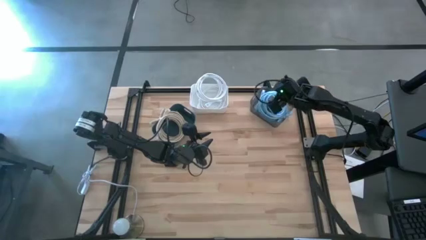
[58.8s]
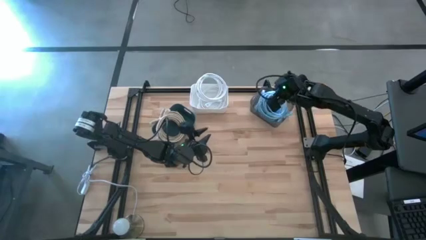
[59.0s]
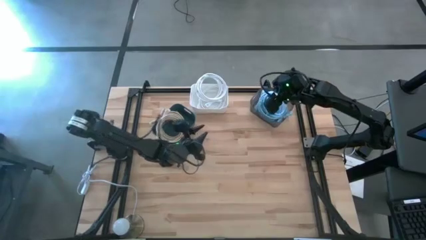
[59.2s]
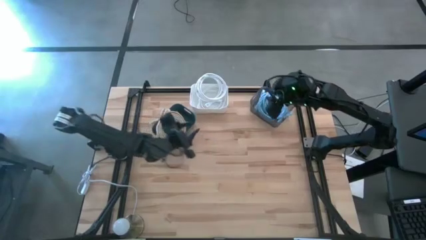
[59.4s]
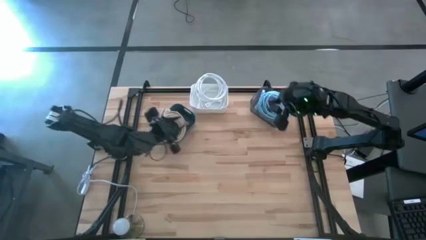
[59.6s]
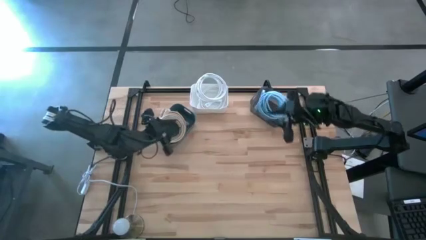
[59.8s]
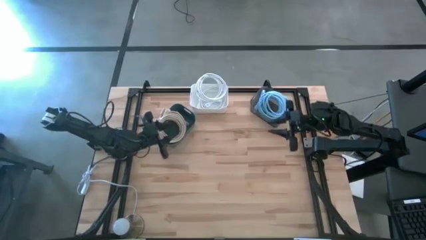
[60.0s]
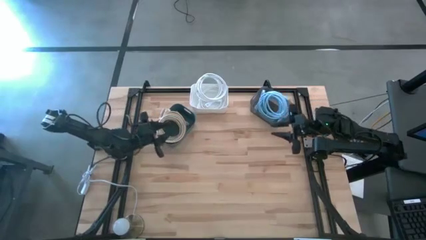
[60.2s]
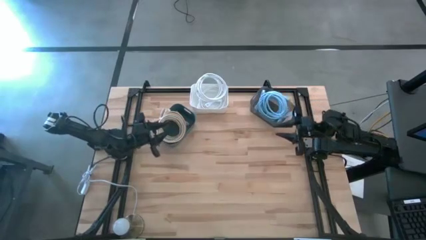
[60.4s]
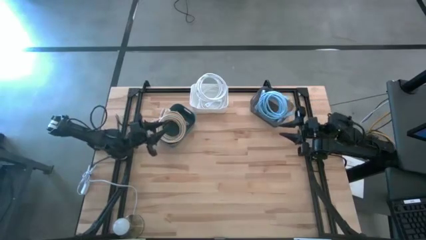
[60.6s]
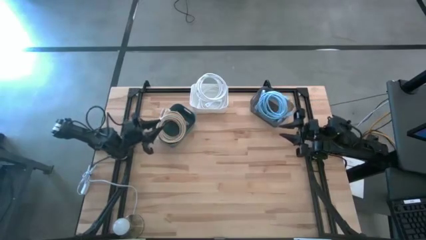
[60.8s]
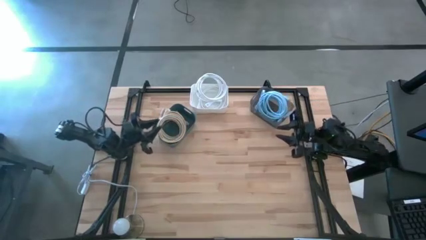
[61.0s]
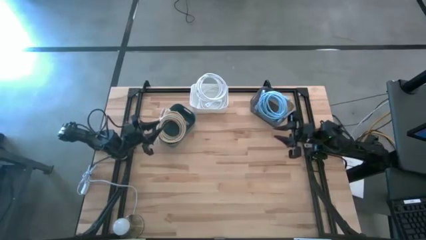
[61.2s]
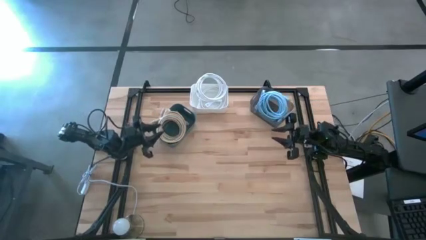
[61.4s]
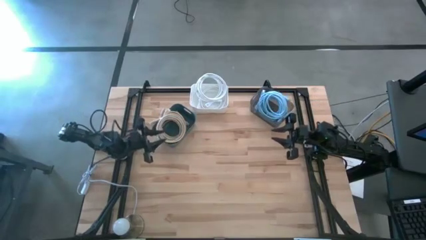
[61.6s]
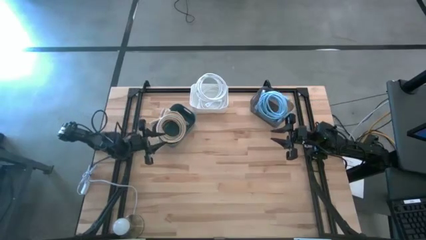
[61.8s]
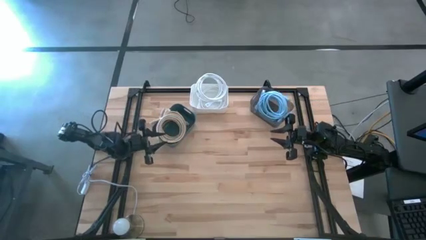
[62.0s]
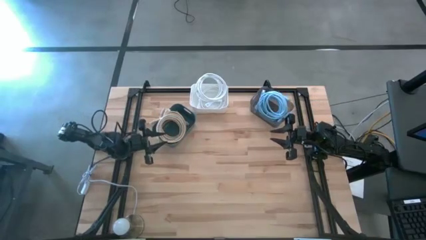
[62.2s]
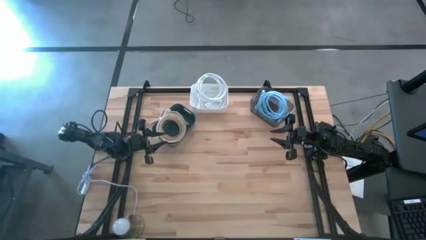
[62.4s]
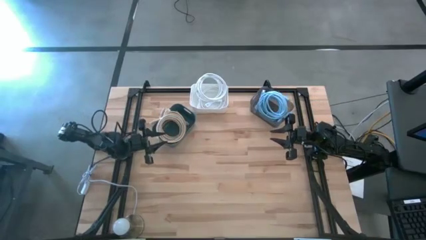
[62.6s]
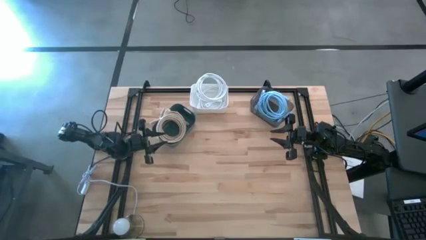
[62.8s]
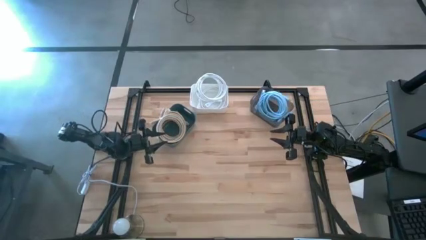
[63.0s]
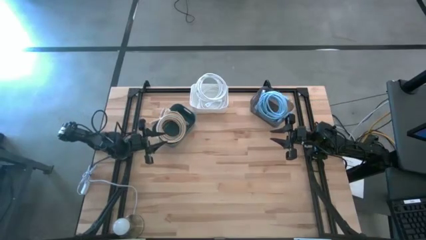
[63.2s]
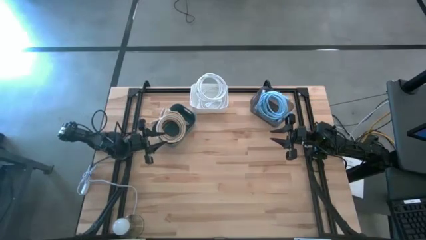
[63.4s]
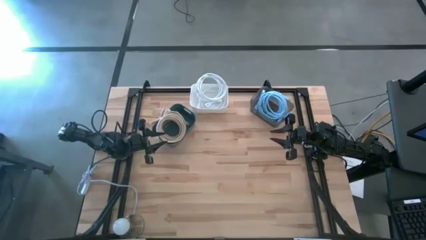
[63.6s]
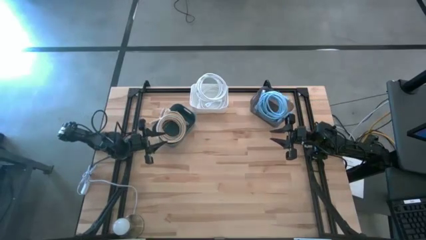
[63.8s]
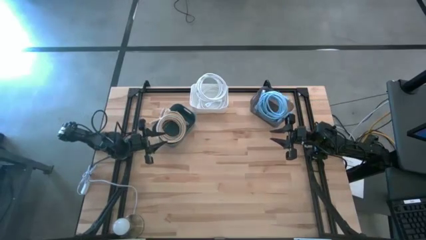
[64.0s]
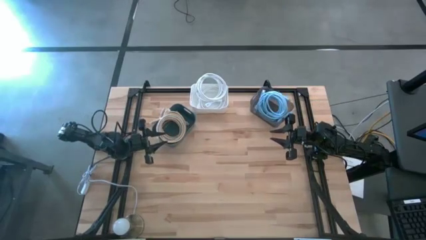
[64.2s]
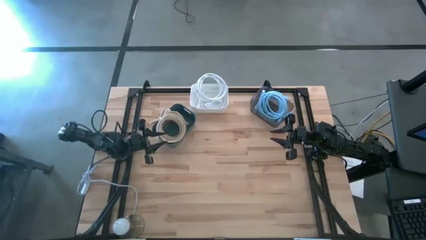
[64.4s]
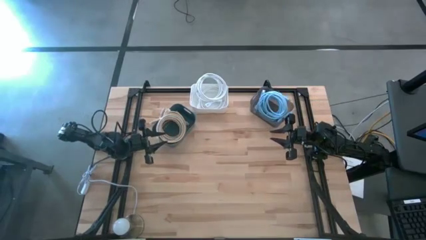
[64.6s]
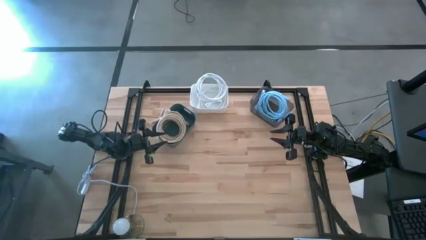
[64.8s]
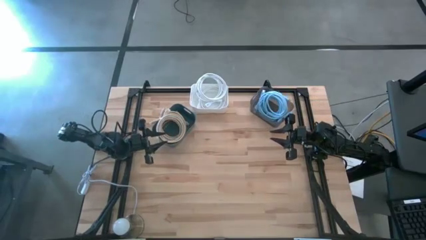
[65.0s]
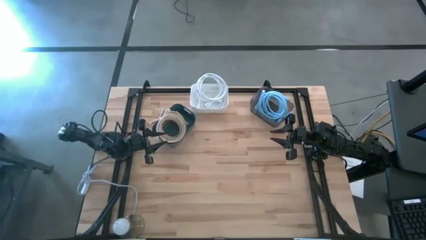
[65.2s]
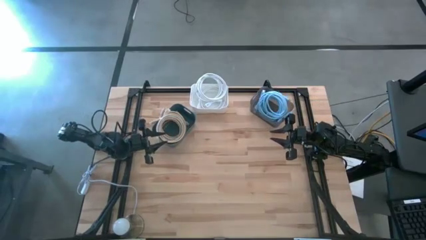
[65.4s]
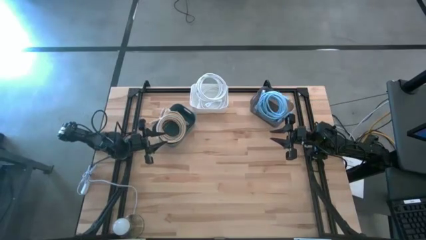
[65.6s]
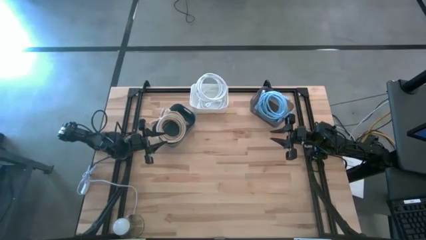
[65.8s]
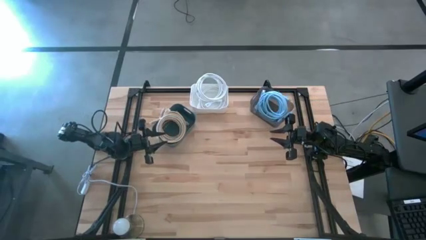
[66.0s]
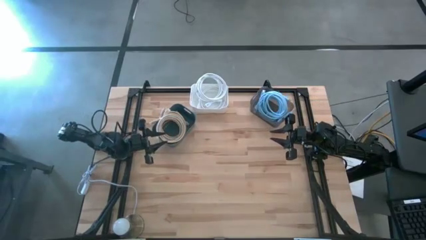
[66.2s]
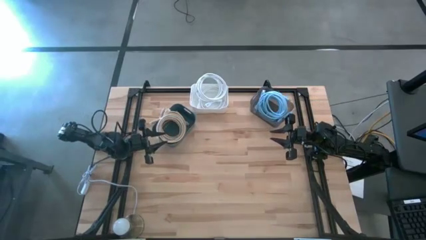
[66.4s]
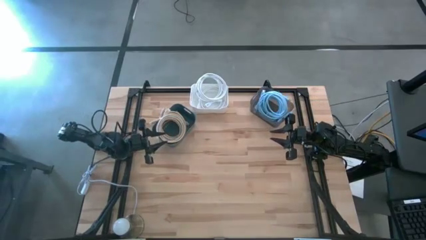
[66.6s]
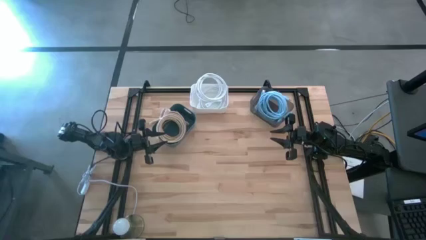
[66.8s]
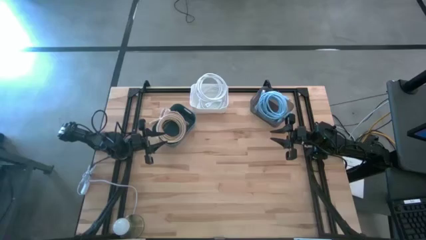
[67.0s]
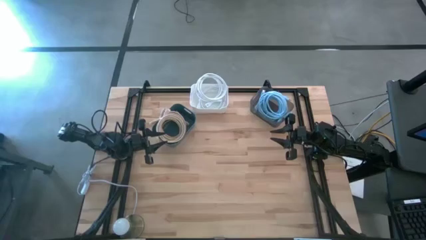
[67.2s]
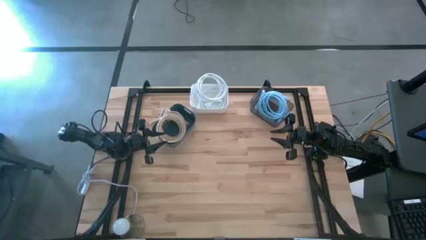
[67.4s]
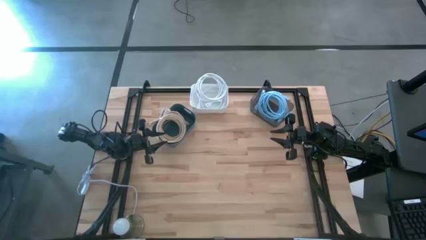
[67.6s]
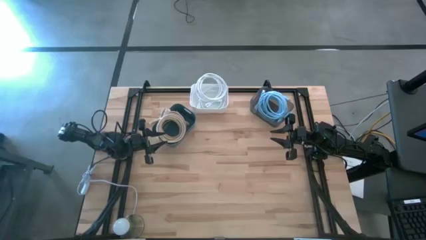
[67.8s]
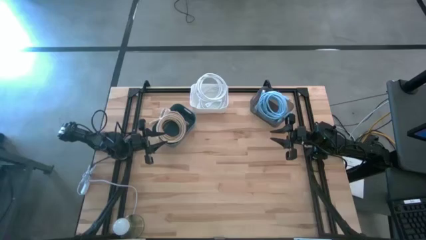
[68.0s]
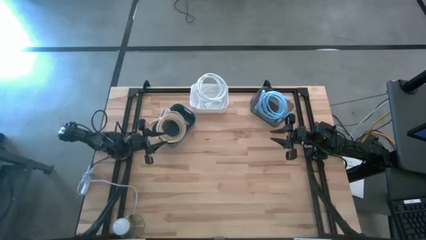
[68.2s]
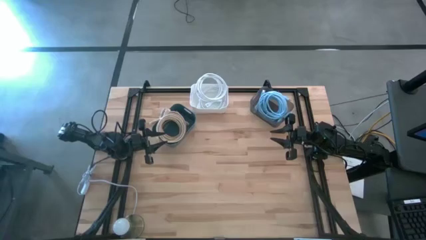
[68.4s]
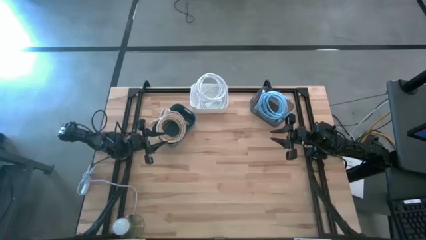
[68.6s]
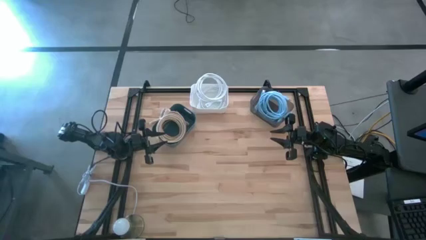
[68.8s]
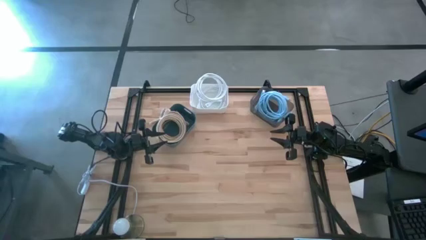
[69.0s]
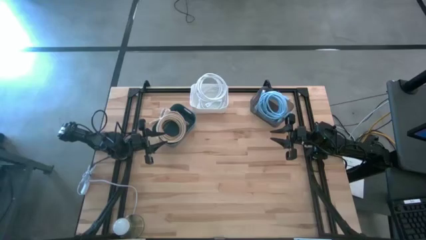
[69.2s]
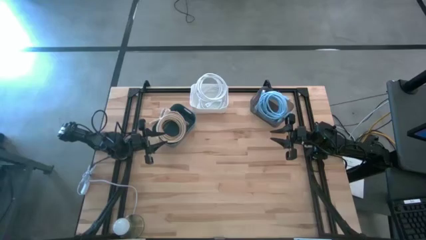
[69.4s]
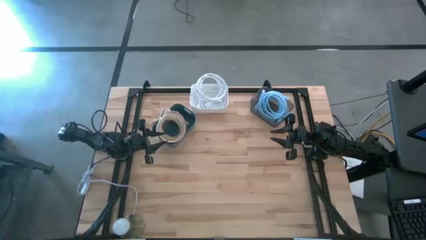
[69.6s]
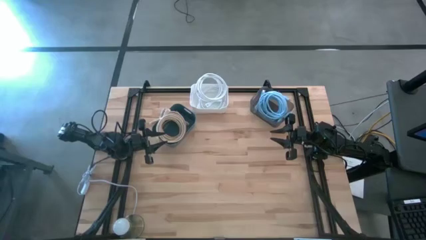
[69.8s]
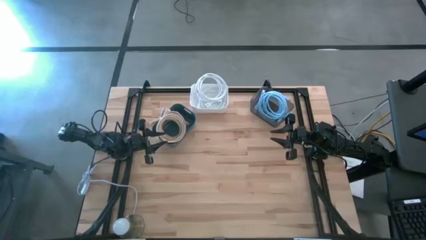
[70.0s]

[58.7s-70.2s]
Task: Sort HDMI cables
Return to Home Position

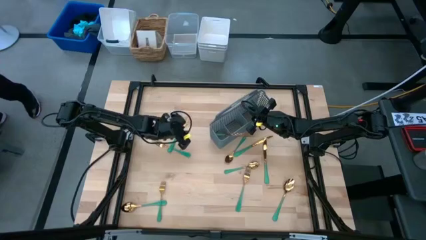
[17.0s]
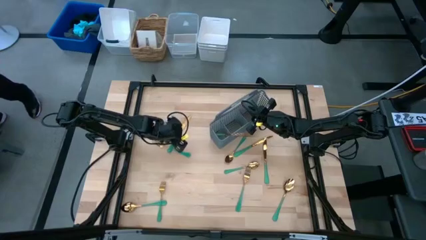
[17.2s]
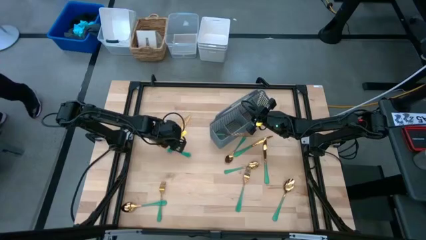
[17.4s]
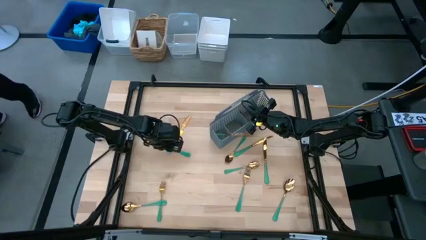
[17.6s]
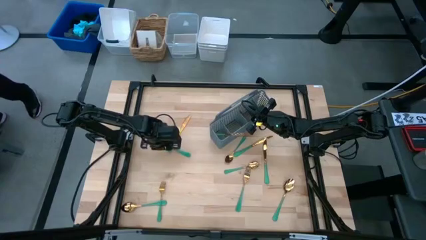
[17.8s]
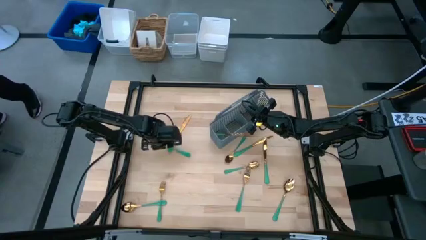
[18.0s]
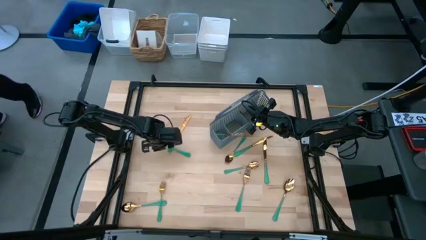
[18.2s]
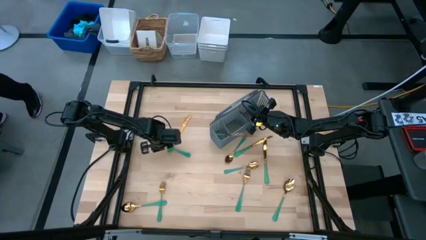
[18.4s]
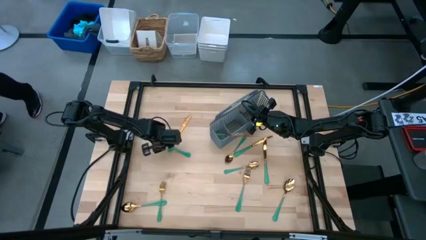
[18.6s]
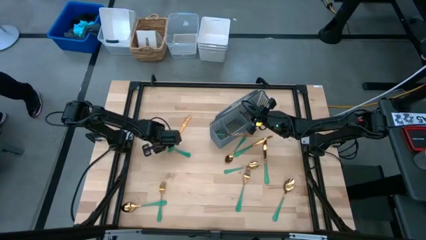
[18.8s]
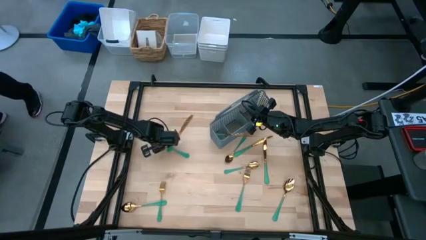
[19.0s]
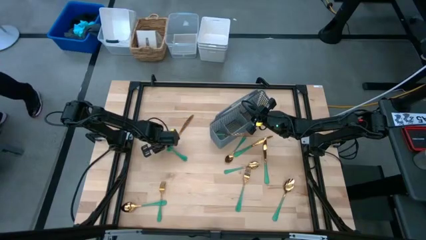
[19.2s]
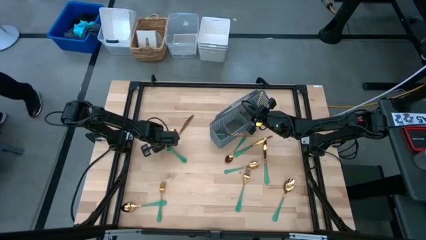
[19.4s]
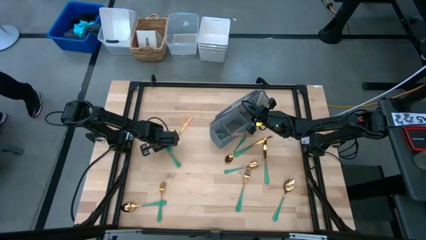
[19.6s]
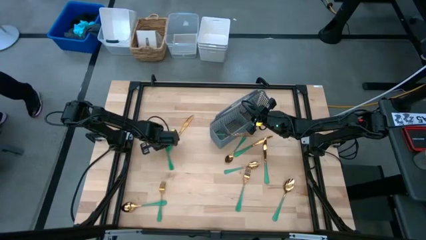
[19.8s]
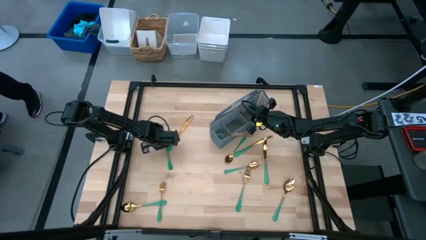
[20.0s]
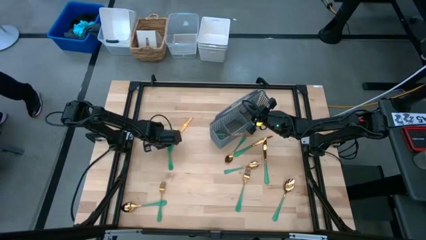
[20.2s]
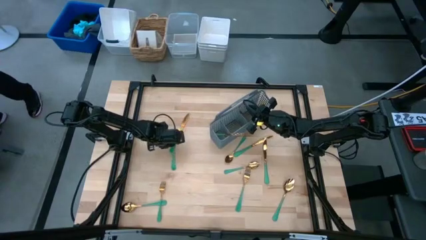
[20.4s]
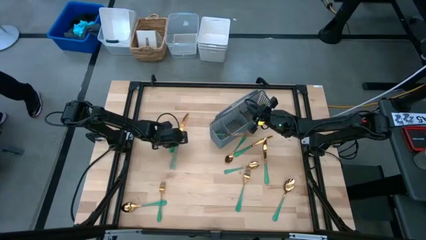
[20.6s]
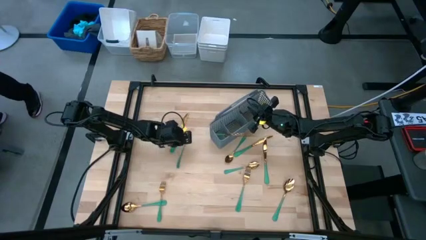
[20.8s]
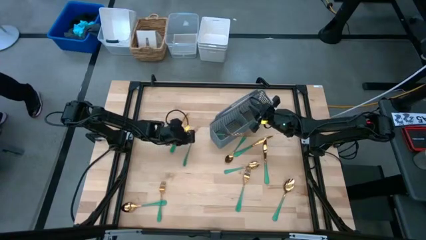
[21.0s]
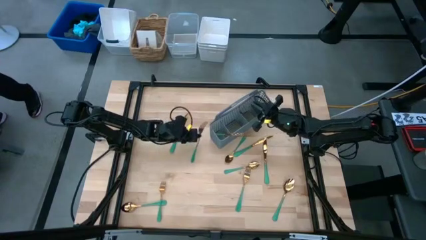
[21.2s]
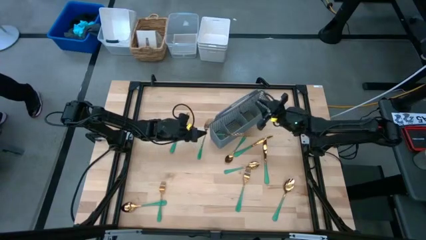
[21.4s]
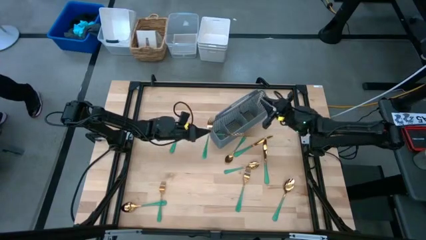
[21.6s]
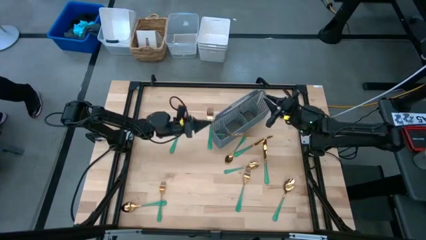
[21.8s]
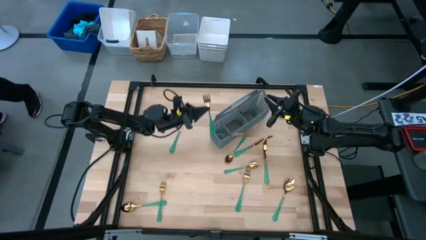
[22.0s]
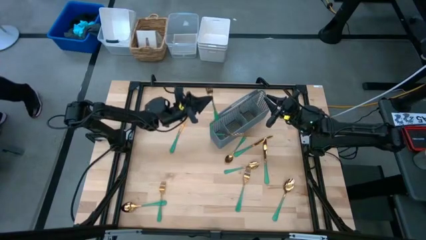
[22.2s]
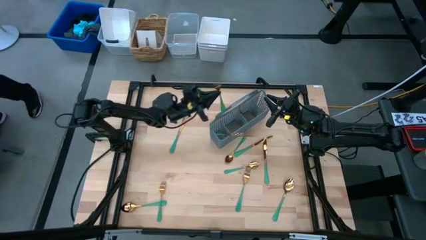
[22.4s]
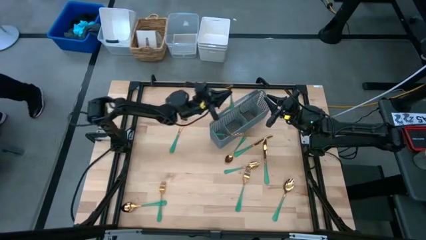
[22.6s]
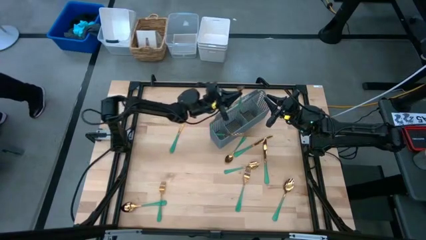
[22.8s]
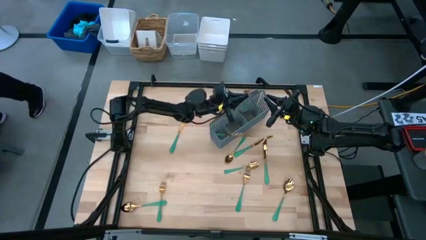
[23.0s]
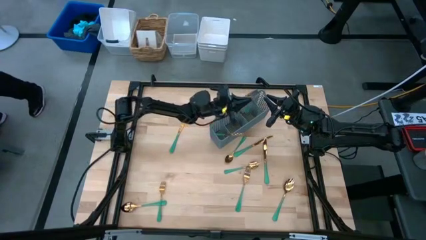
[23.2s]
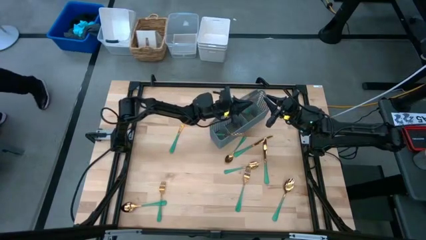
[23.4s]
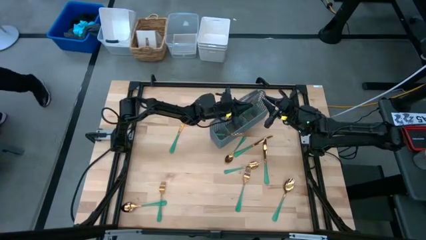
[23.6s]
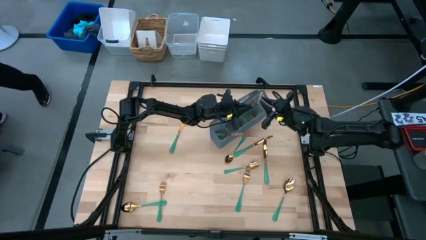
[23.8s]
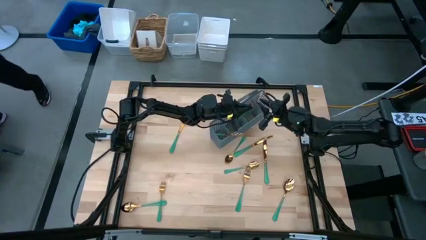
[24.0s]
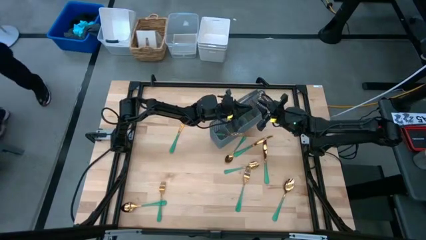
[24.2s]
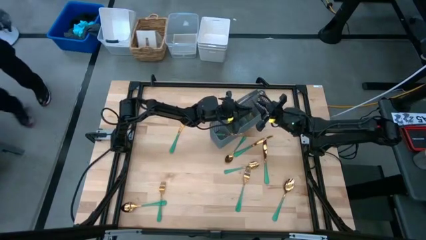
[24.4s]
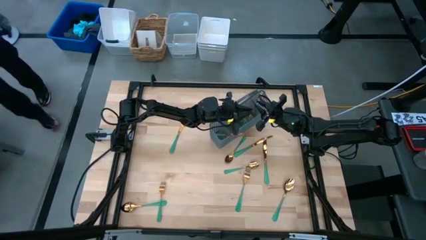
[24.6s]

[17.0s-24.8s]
Task: Sort silverware
Put the top left fork into the basket
